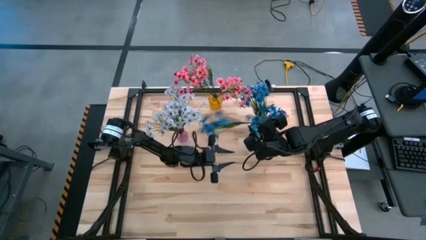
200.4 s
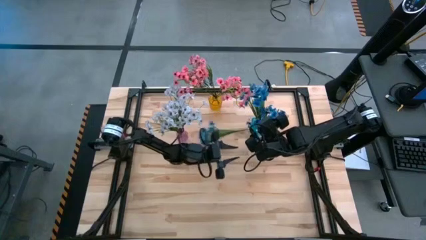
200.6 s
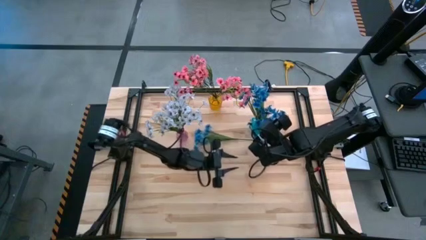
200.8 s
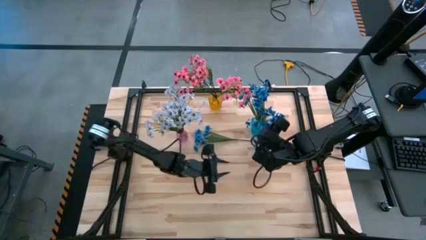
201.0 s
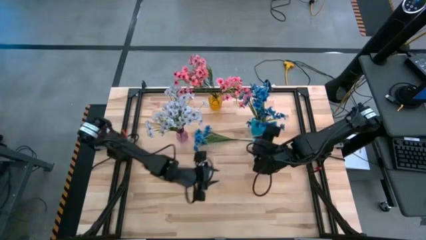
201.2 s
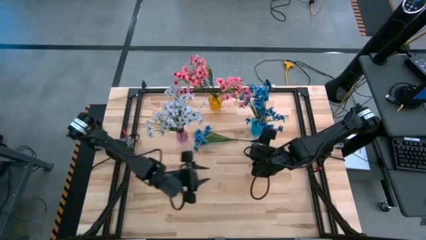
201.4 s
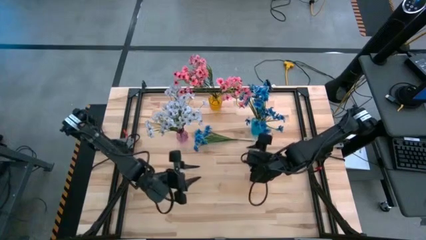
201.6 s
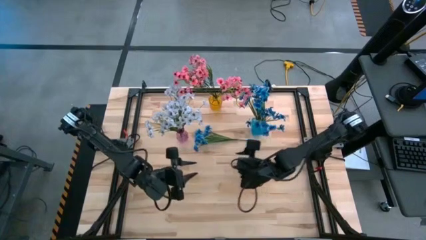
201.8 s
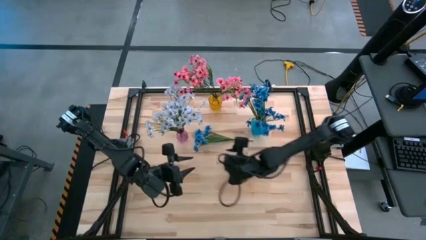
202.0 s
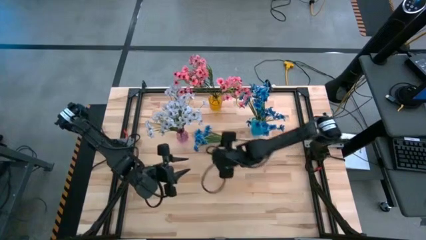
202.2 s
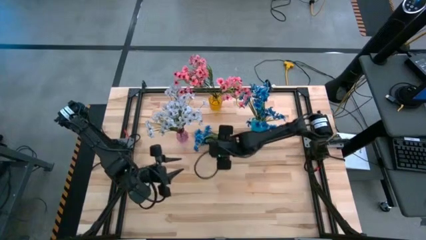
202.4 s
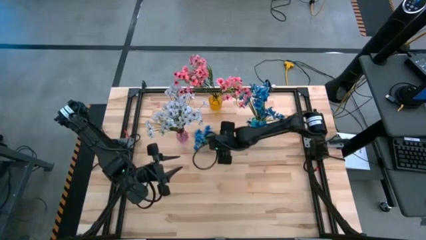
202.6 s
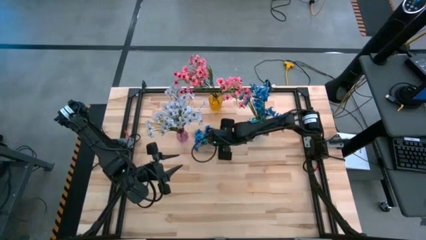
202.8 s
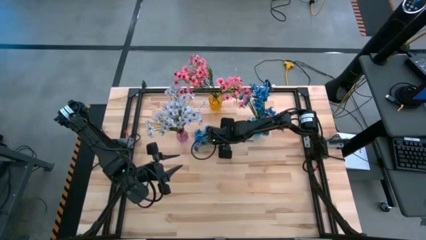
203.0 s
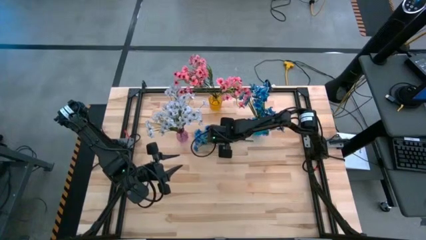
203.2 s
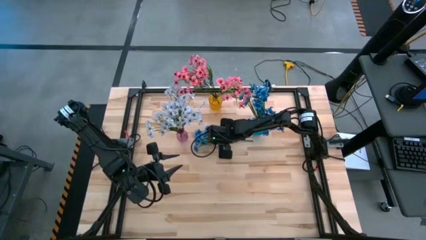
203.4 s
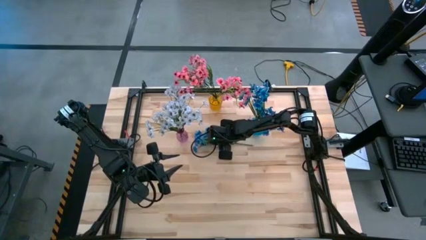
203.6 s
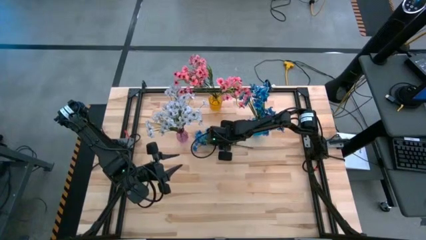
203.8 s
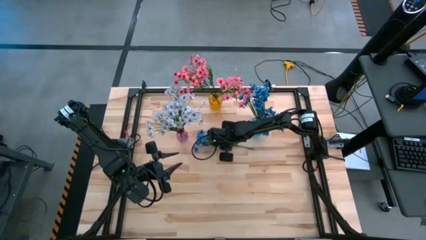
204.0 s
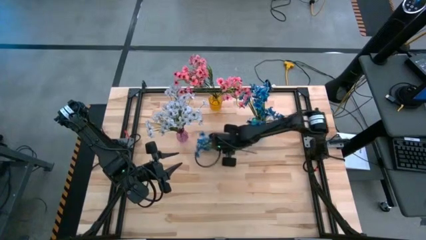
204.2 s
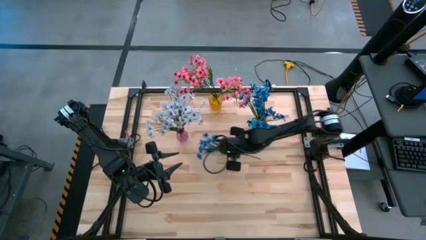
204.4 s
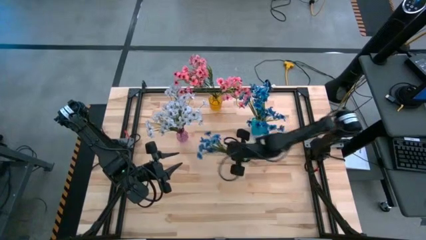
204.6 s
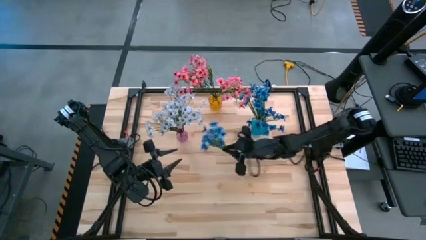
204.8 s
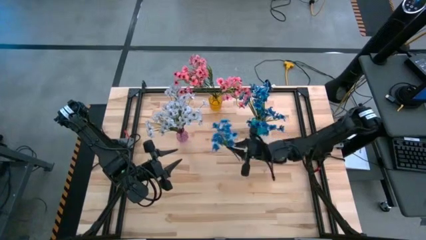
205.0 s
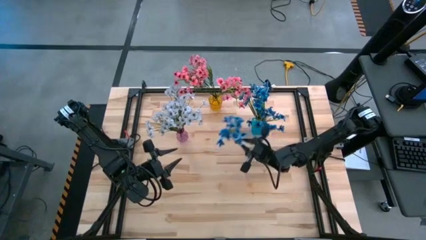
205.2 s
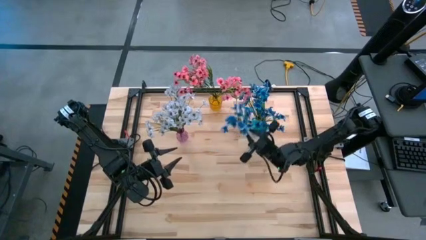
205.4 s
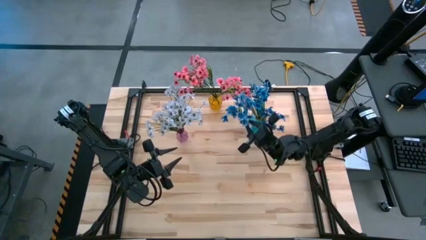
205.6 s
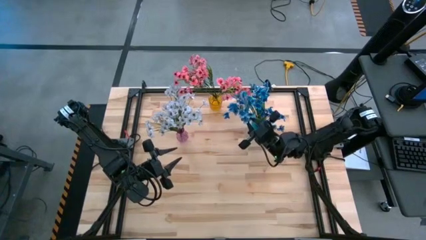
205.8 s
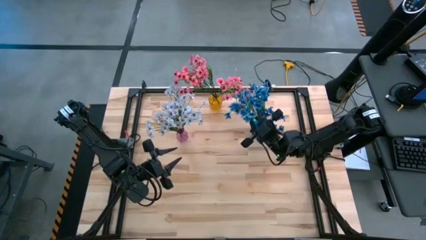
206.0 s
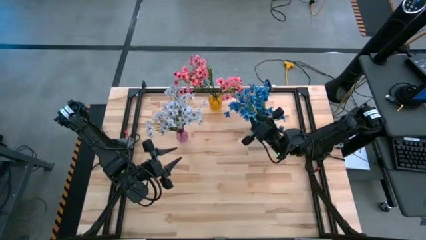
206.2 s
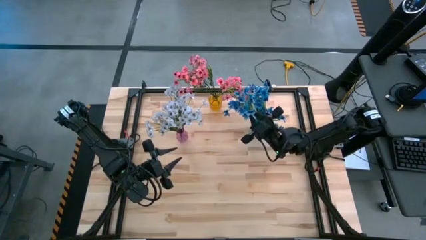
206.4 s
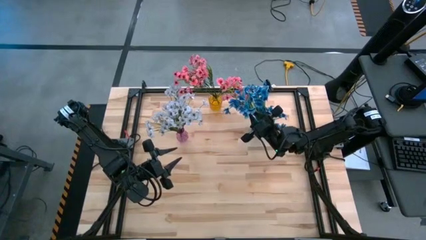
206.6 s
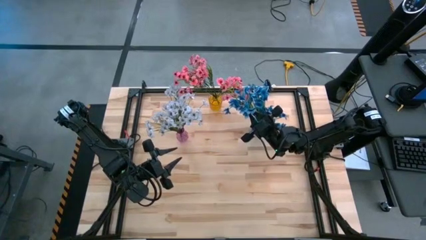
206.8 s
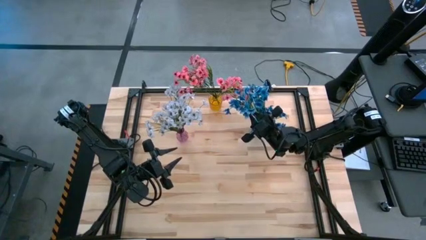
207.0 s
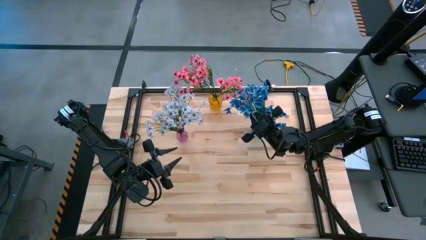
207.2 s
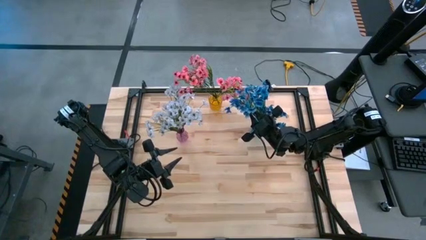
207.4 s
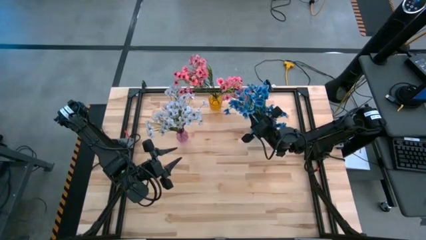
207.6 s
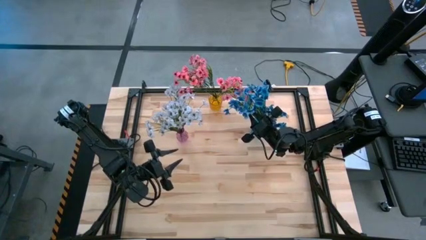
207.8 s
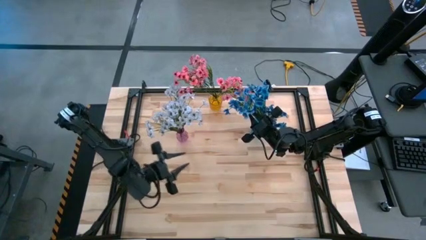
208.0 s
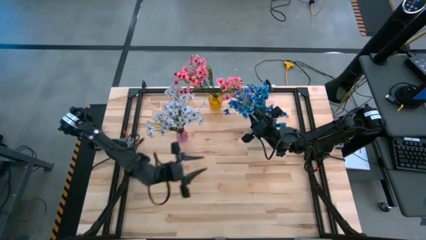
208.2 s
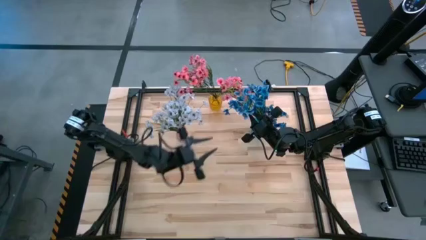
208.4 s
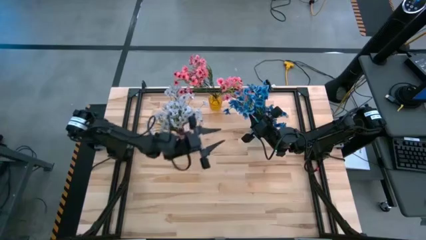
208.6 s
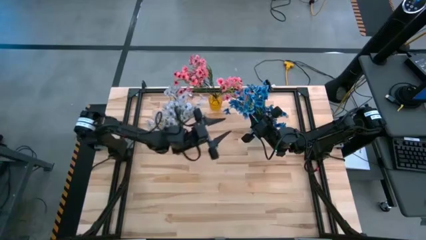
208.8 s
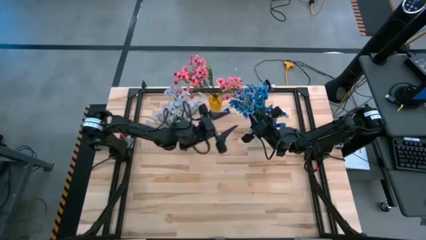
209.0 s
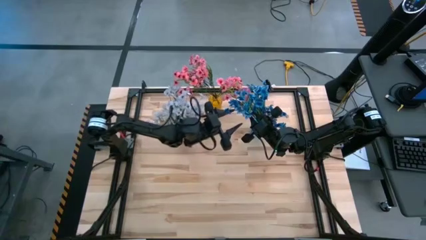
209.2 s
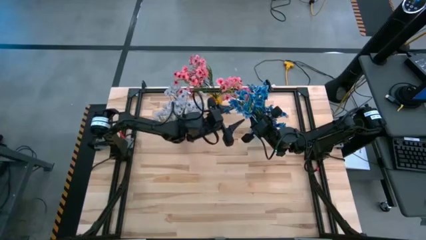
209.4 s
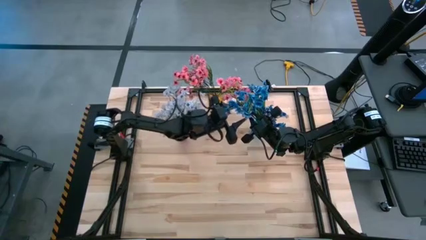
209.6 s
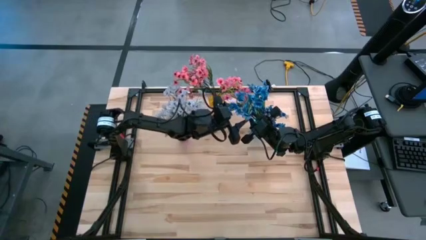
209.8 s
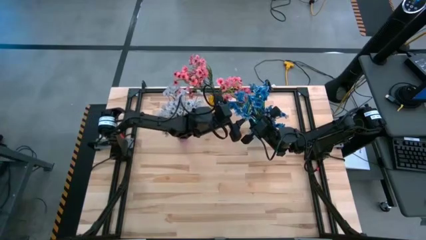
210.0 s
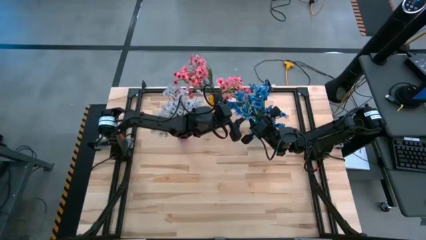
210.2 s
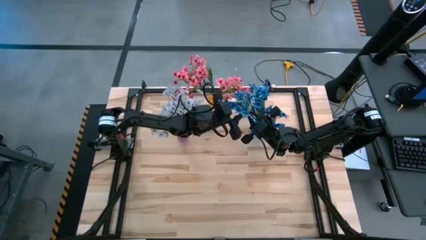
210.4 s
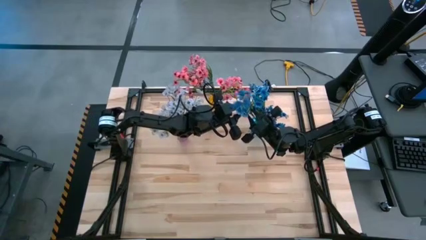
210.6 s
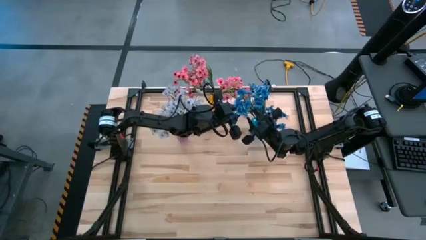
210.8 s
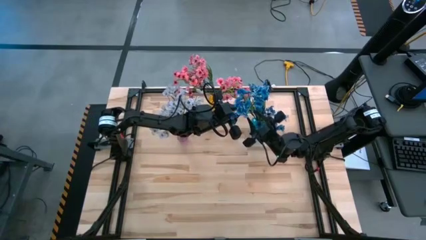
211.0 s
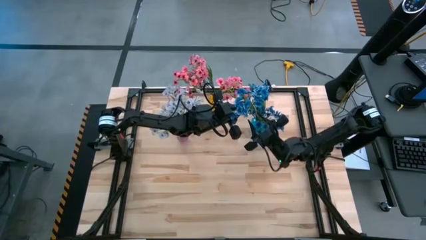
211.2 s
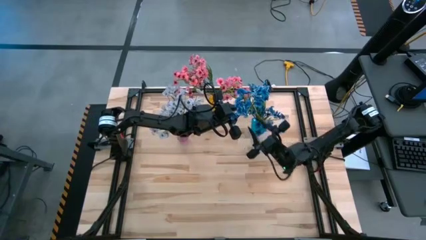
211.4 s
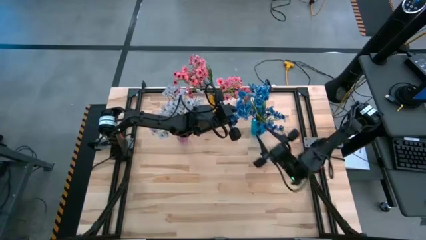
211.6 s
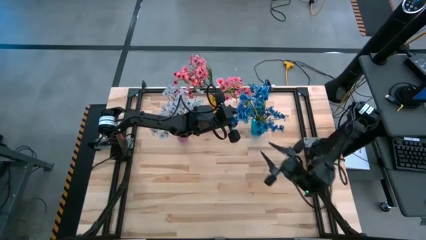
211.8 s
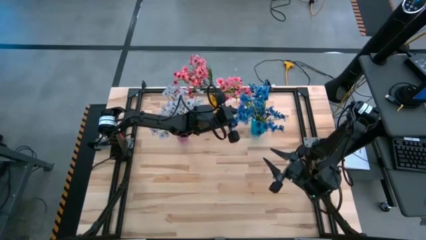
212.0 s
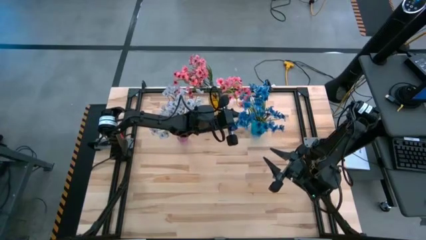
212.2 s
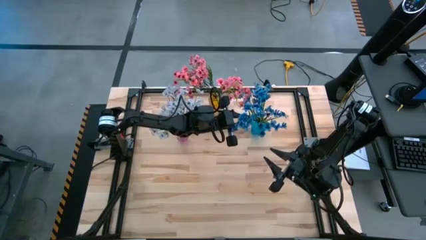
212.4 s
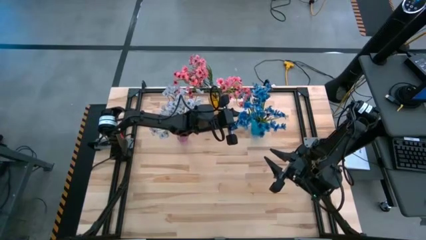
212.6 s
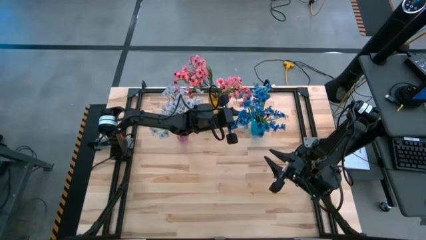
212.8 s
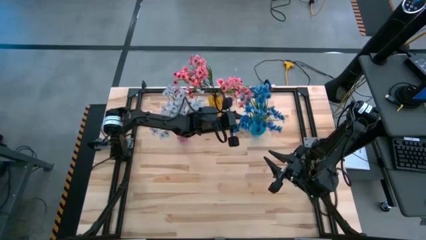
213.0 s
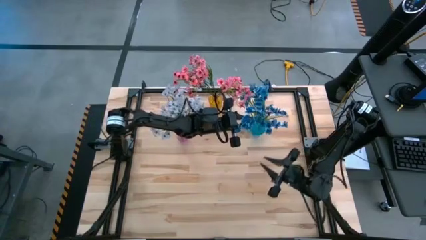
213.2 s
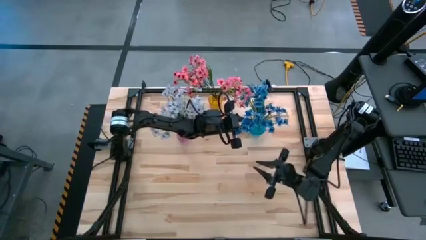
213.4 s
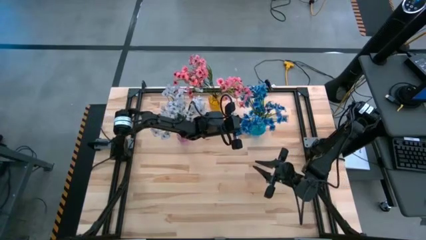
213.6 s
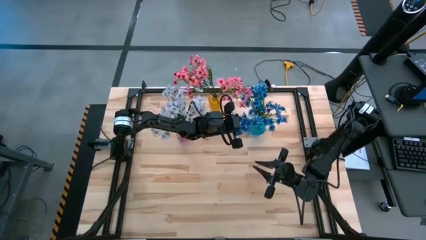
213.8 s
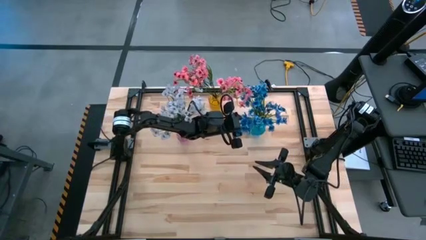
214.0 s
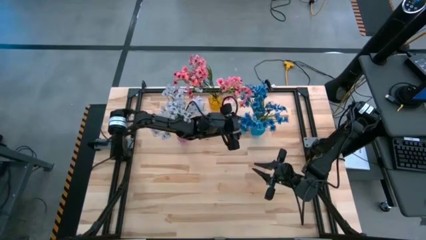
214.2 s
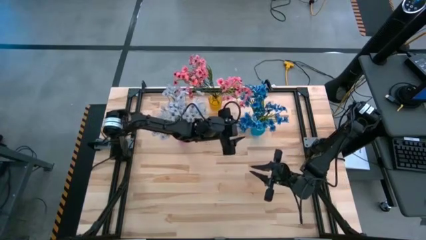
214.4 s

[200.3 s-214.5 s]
Task: Sort flowers into vase by color
Put the blue flowers into the blue vase
